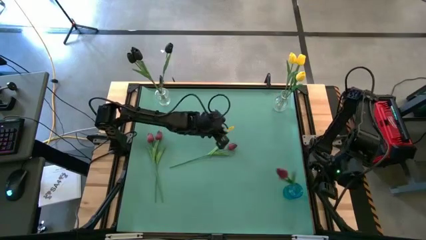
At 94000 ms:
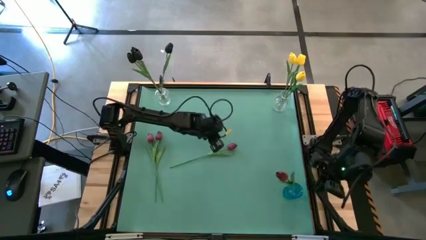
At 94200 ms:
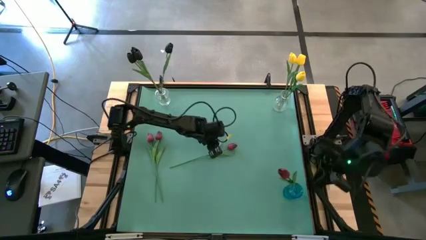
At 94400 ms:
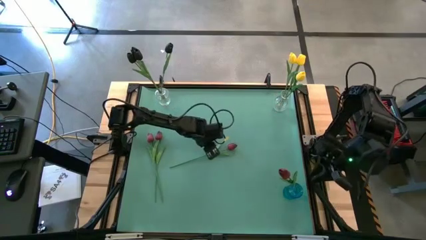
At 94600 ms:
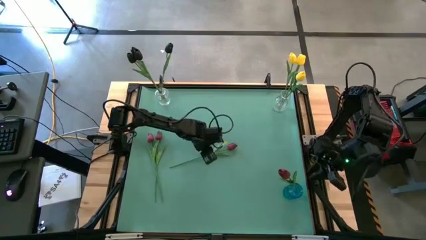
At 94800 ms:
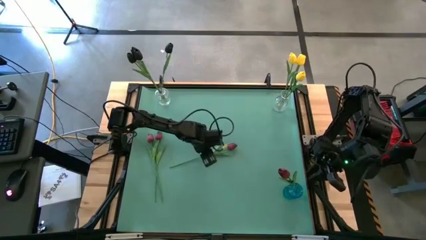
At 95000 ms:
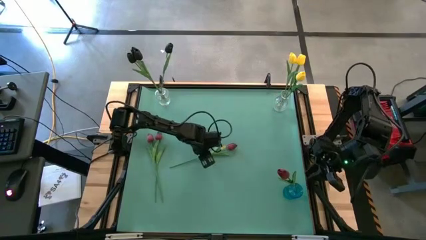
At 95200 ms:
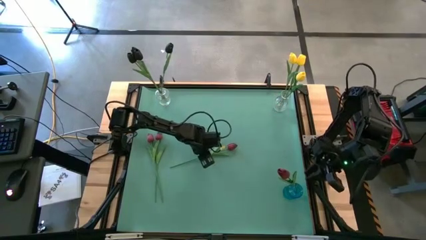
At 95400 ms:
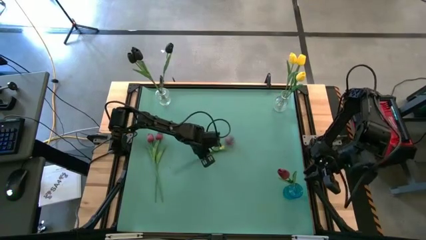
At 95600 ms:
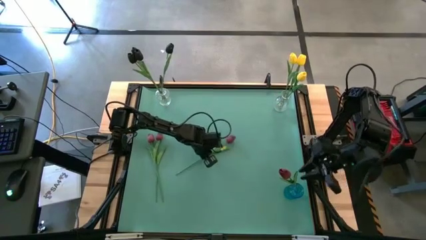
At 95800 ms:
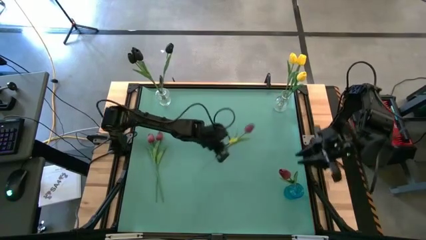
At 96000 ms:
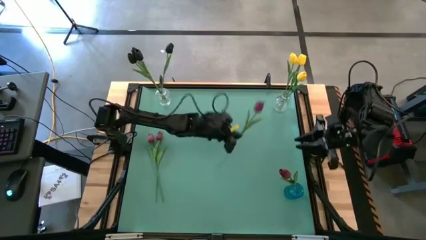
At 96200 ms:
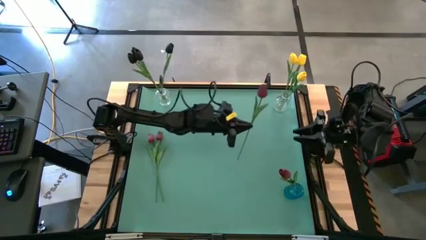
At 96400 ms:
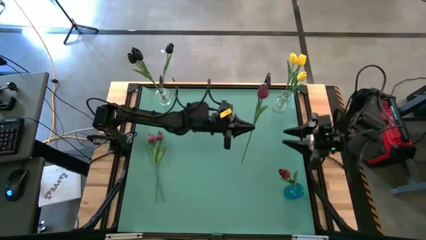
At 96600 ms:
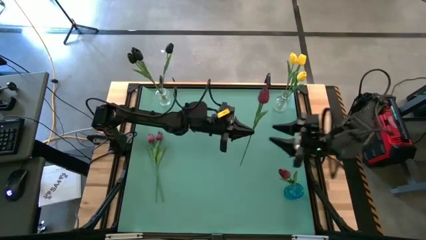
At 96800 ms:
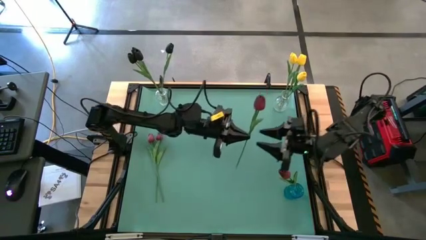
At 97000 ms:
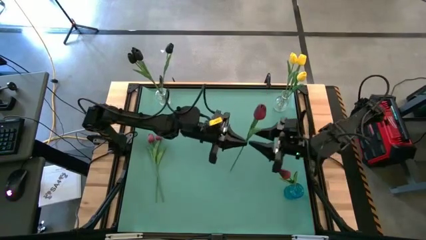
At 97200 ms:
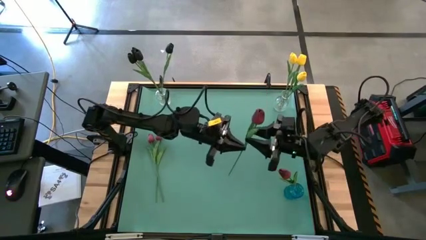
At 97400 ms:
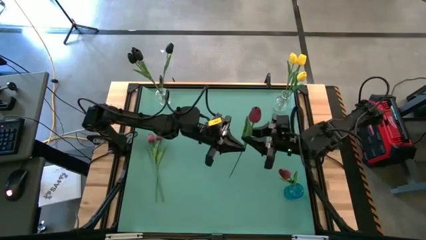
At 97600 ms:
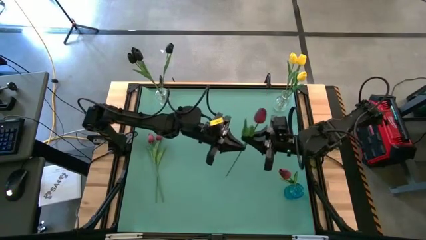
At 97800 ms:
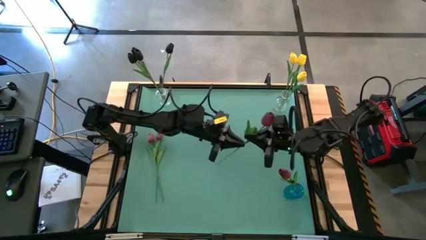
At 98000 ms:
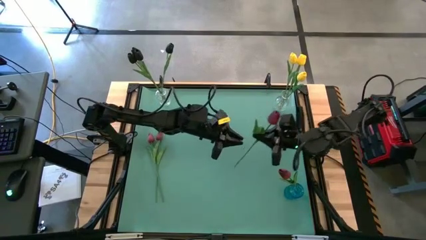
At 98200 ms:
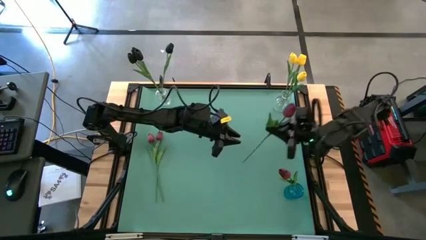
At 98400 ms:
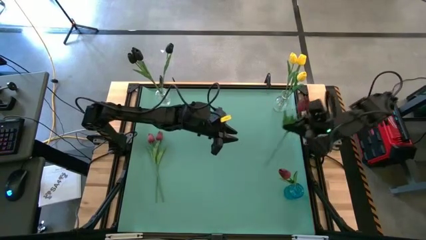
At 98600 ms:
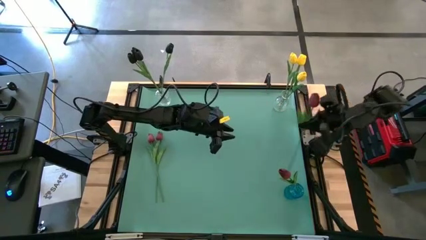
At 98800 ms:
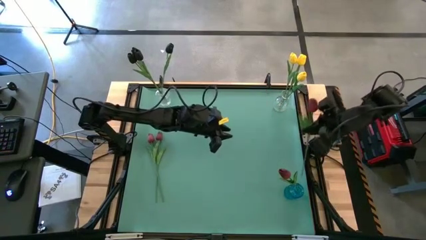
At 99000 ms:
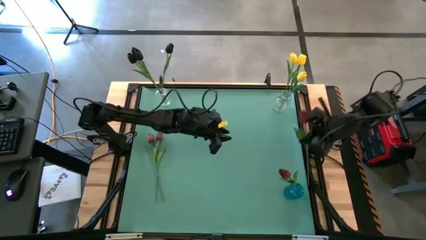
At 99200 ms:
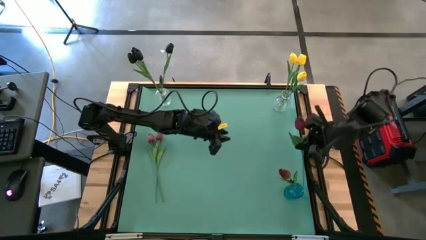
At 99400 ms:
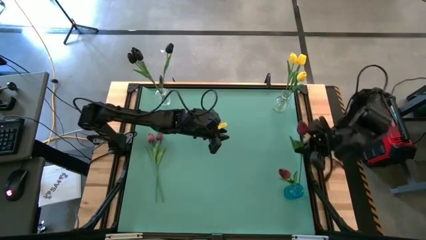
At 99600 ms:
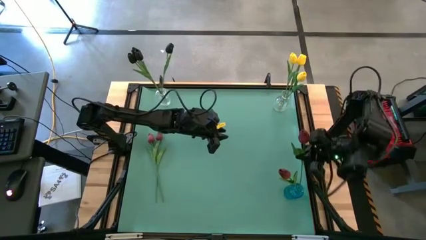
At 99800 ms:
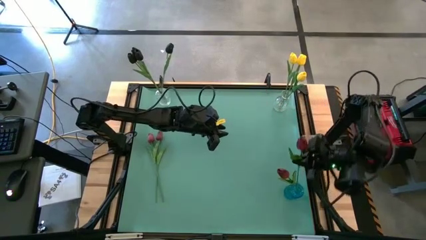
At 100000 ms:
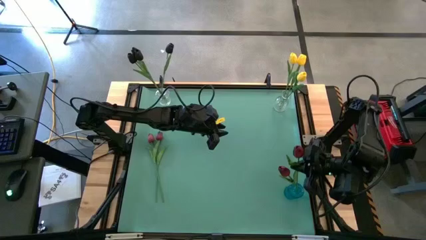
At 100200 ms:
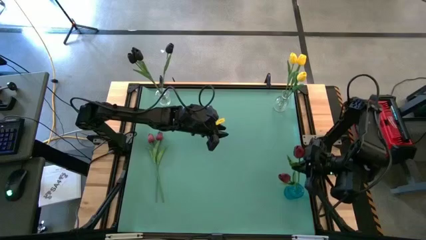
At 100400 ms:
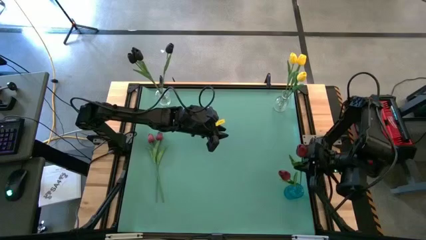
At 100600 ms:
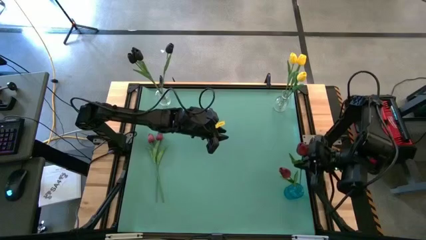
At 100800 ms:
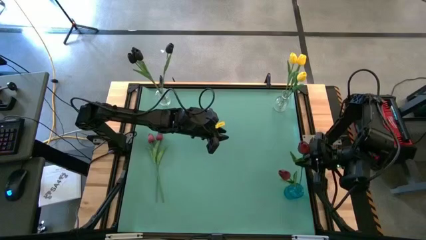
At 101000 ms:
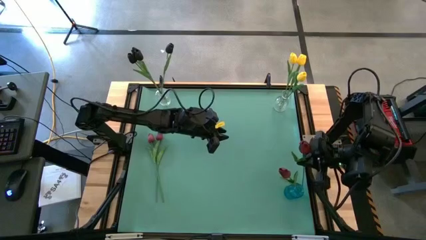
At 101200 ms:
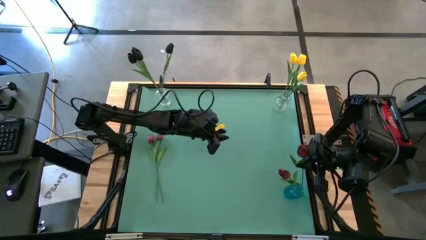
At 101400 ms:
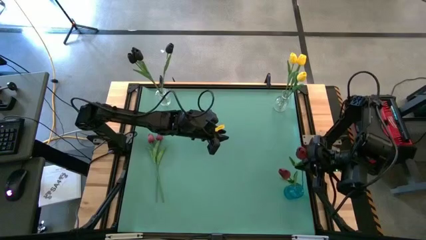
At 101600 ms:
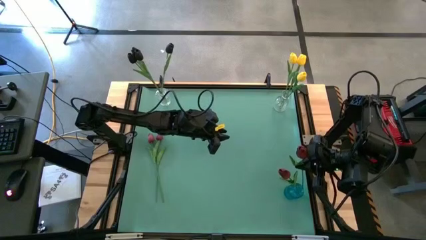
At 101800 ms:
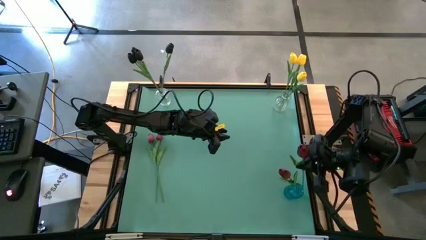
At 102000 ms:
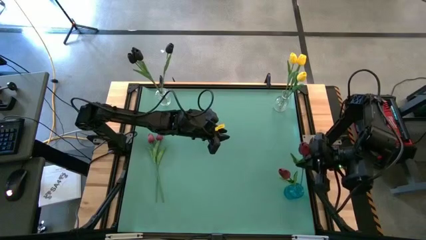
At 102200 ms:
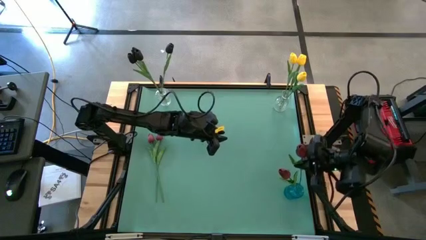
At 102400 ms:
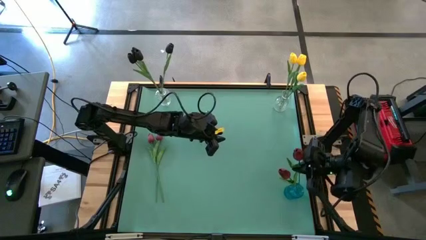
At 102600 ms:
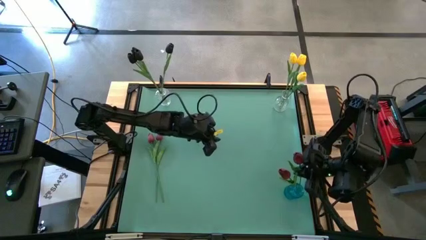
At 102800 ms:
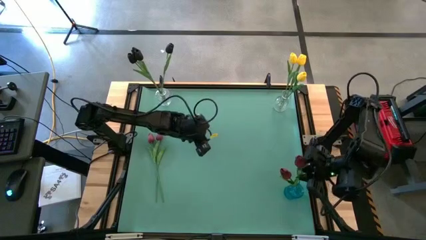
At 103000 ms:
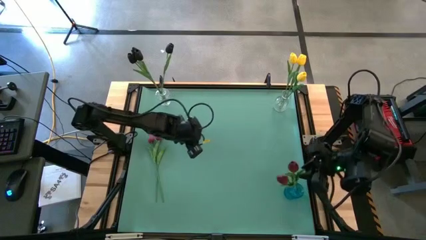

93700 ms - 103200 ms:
Task: Sort flowers into vase by color
Put the red flower into the blue vase

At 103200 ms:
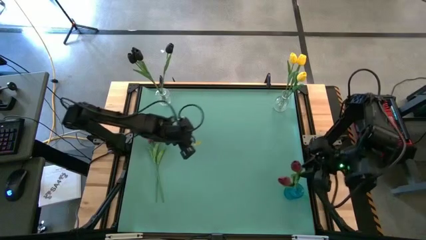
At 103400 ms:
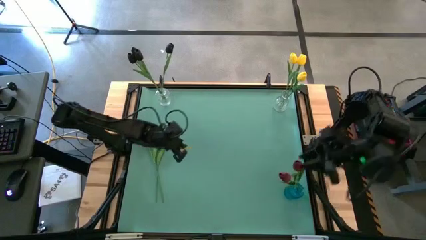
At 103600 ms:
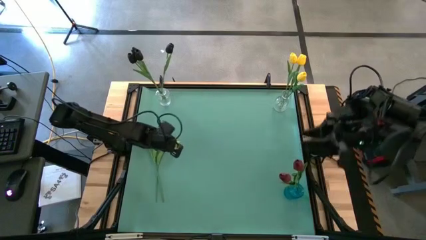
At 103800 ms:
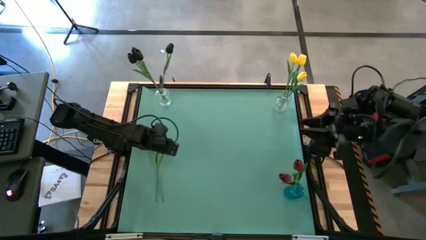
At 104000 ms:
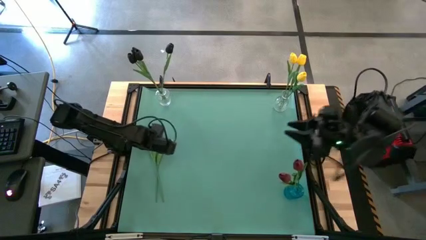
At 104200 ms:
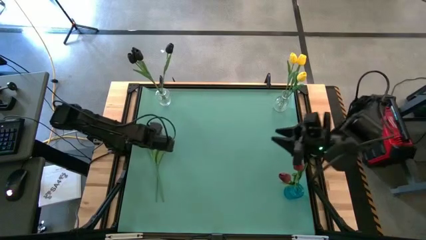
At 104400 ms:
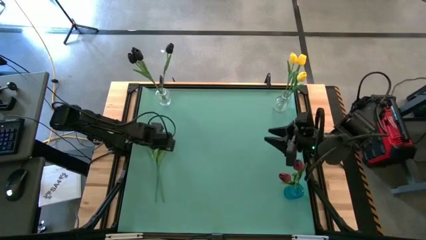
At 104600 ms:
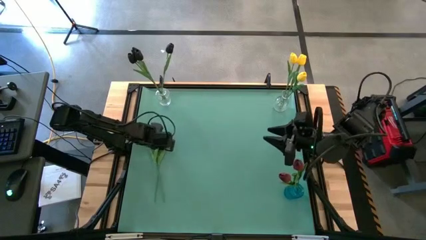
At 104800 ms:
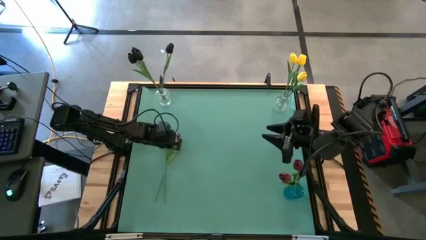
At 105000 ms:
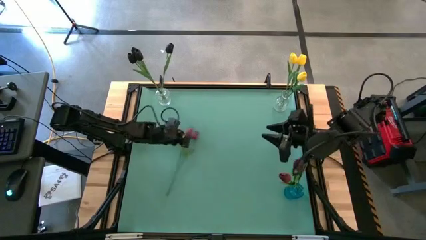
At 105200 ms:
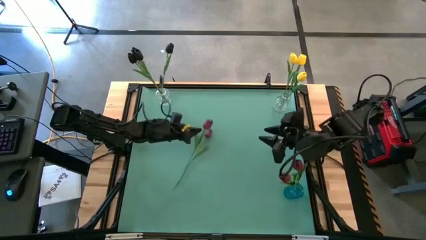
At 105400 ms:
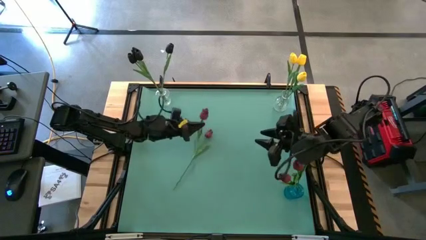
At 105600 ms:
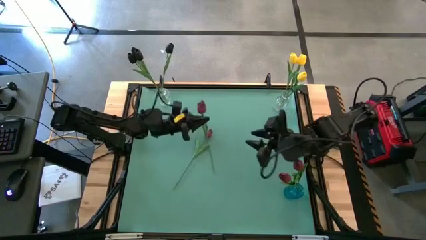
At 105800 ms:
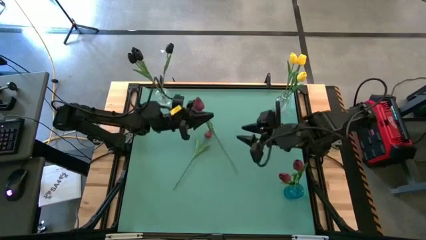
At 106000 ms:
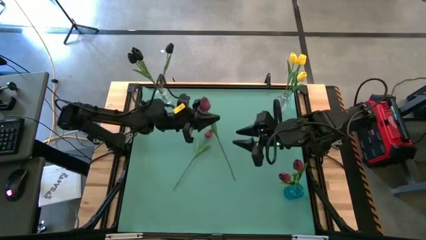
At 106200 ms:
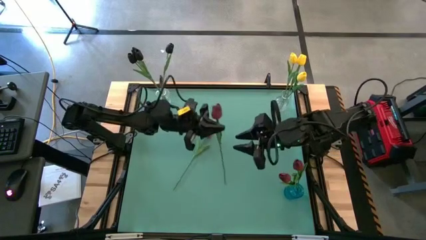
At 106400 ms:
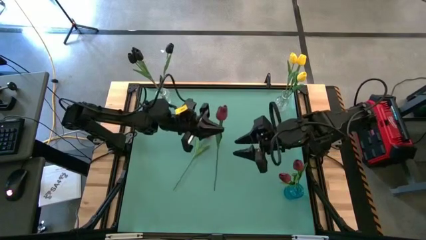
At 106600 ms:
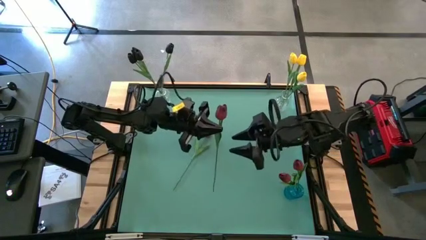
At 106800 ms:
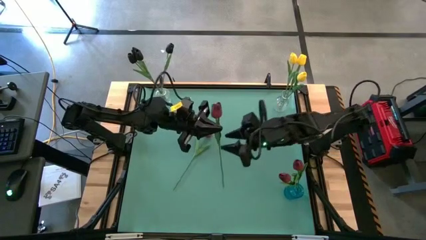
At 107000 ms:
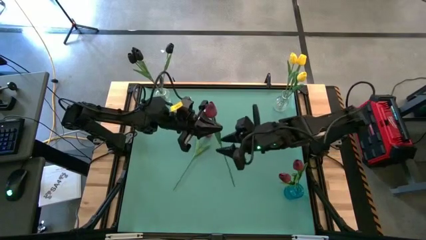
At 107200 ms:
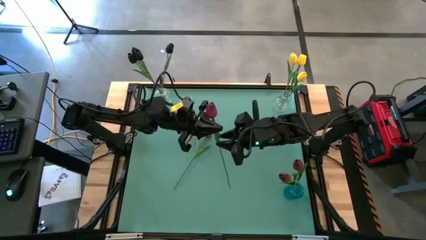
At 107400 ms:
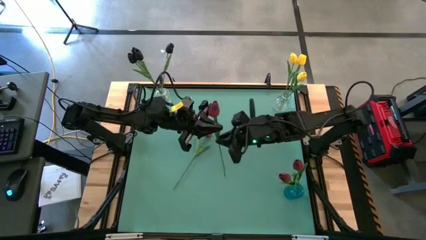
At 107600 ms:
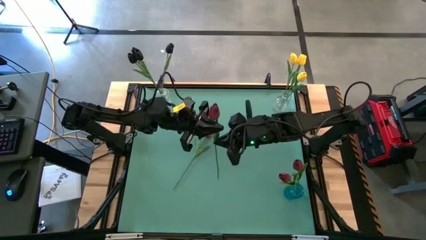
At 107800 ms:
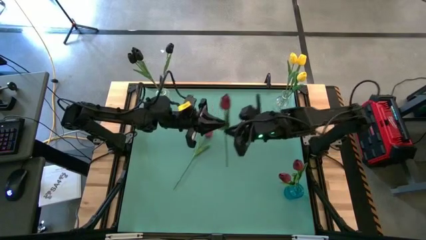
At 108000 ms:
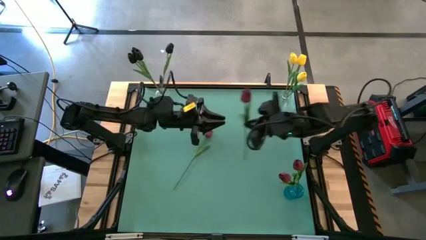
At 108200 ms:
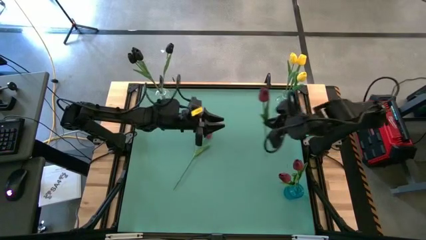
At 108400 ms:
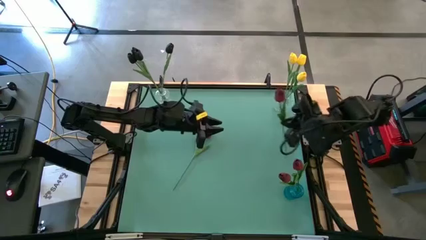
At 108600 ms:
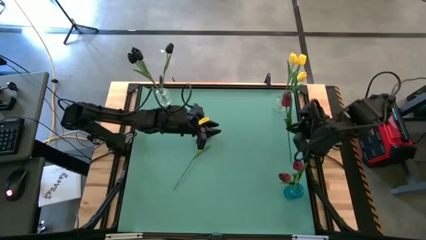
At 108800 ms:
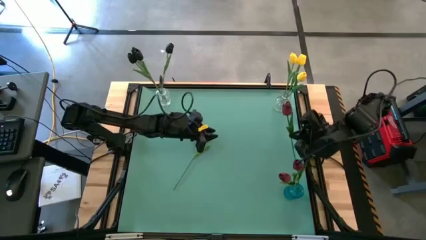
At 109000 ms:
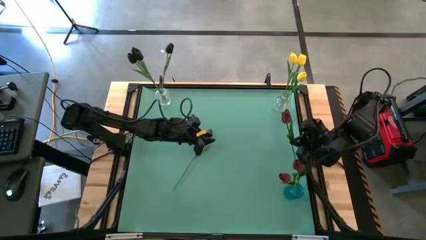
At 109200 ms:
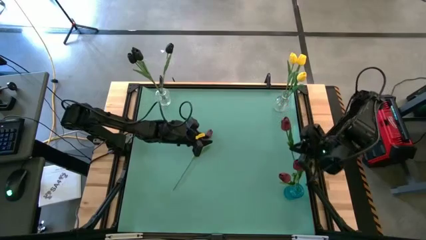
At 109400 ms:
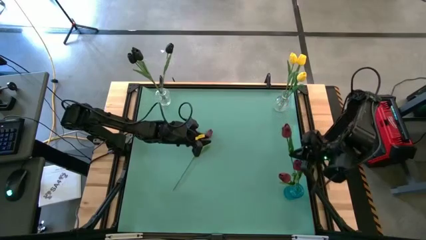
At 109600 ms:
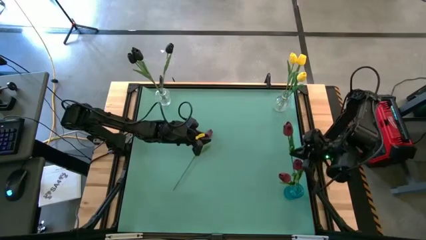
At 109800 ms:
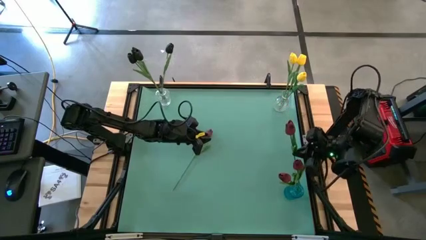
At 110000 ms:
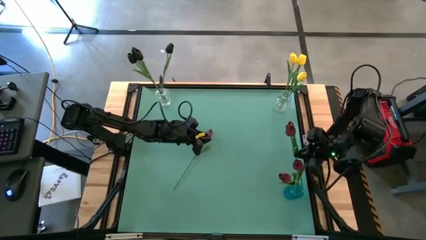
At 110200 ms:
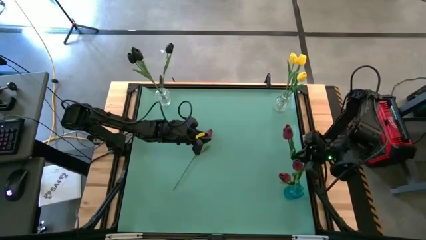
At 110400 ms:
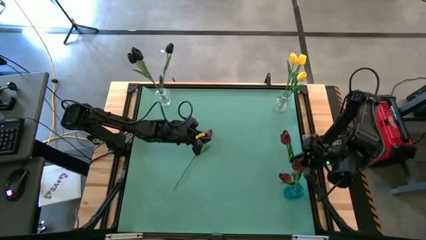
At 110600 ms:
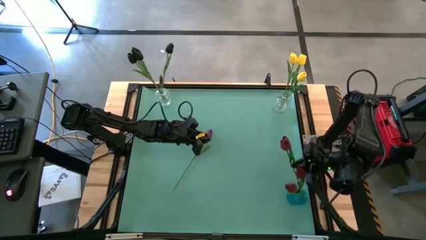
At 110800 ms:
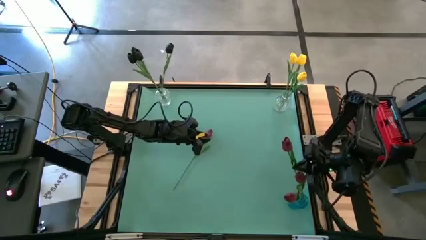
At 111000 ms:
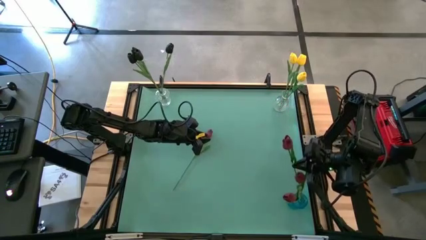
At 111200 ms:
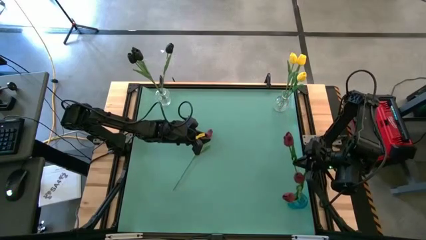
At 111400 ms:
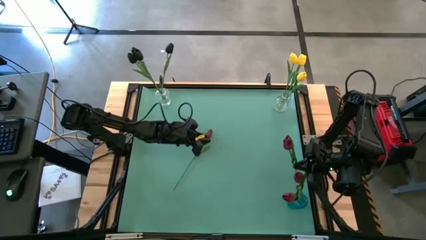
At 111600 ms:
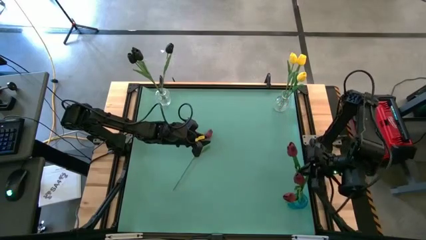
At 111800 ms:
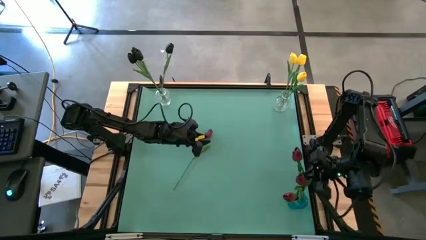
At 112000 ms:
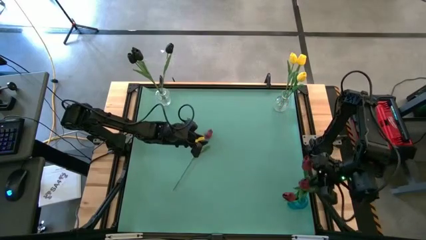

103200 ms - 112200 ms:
Put the red flower into the blue vase
